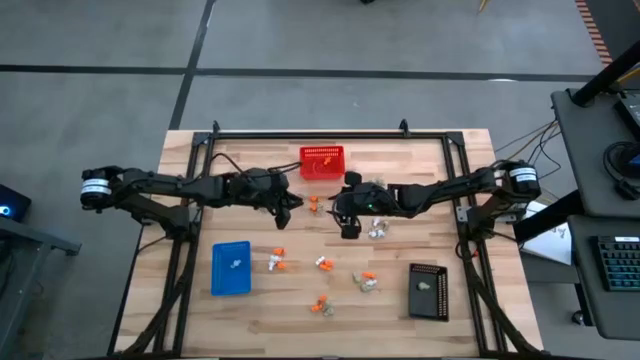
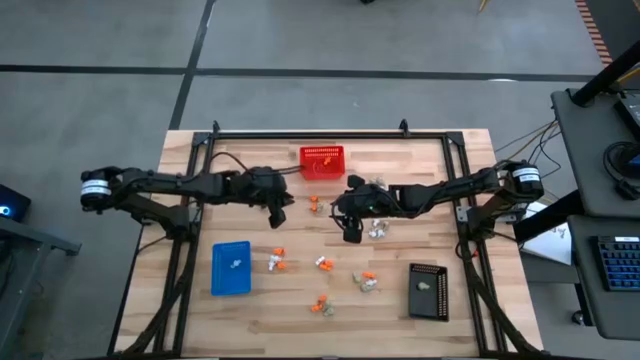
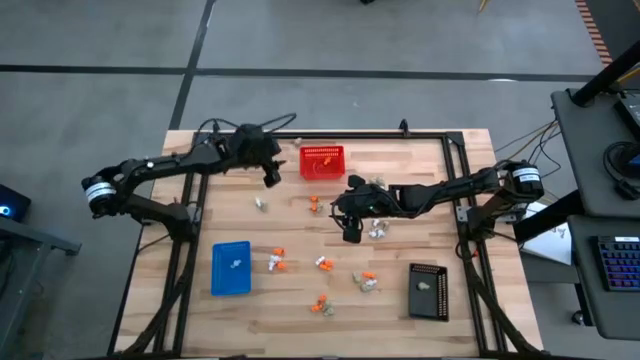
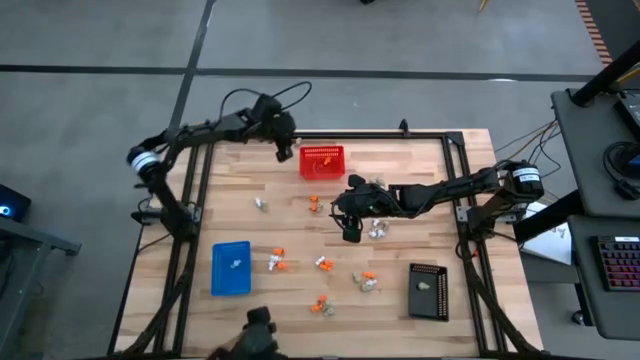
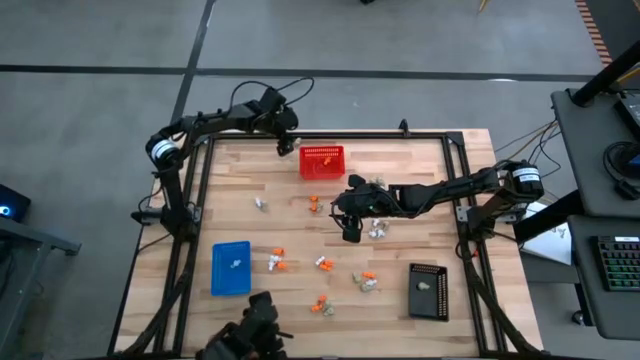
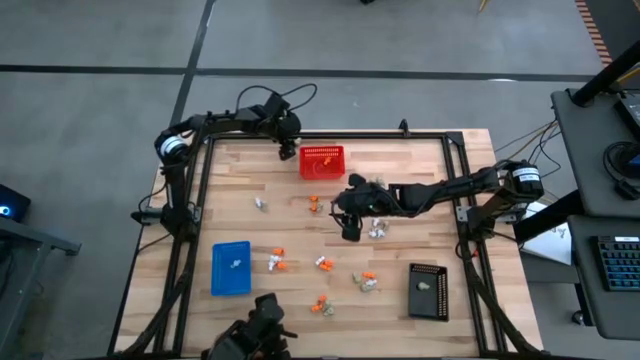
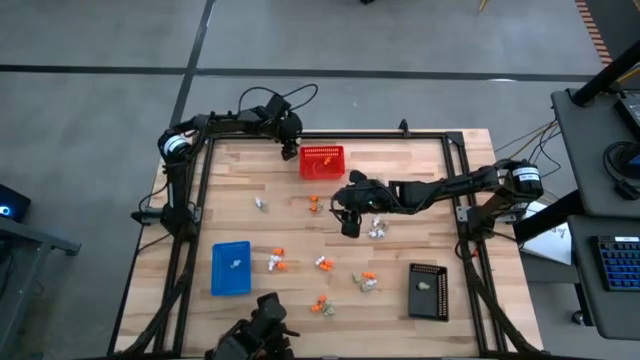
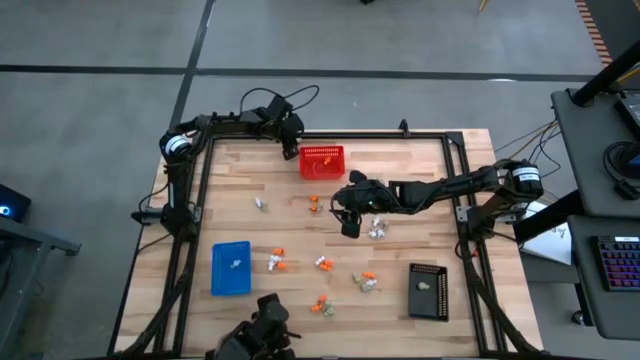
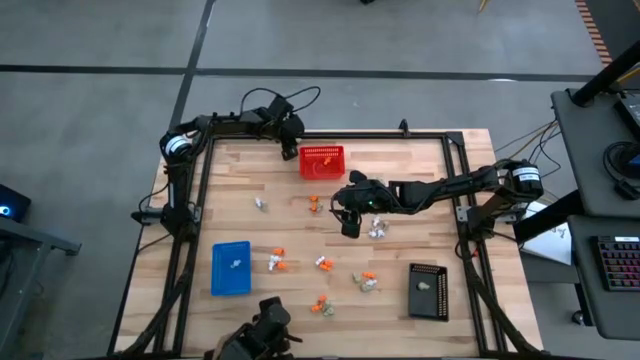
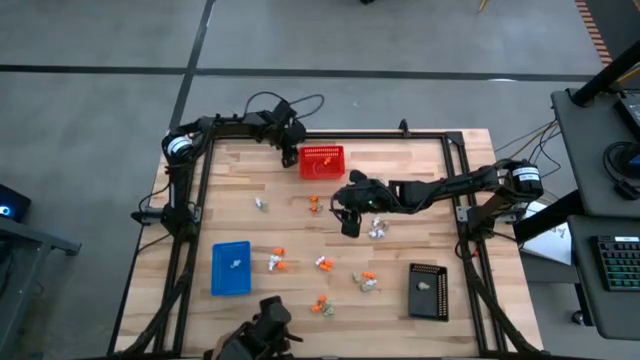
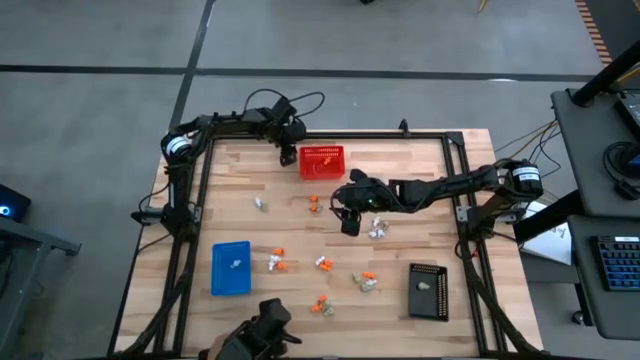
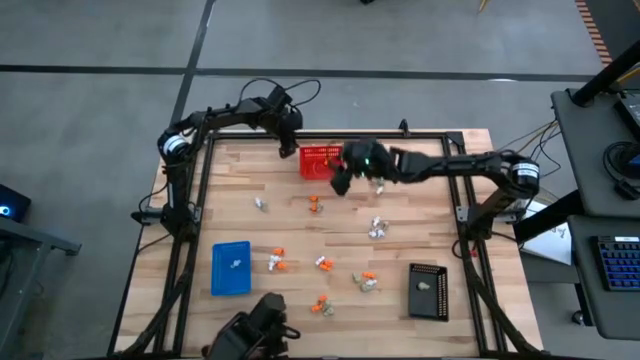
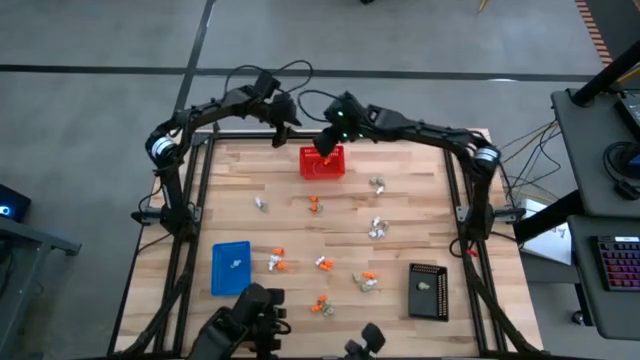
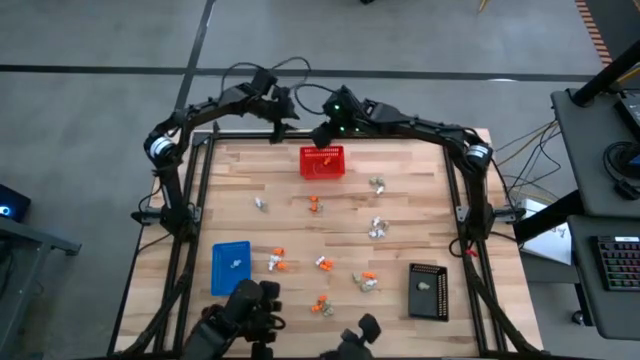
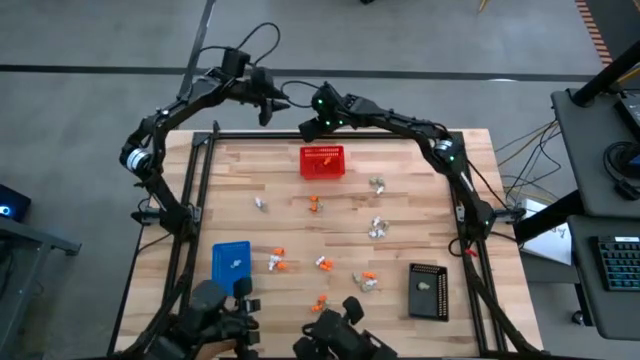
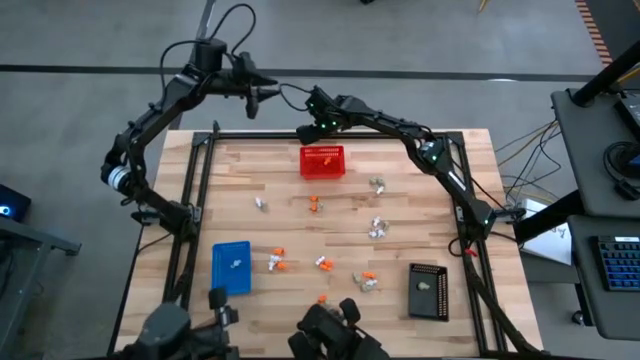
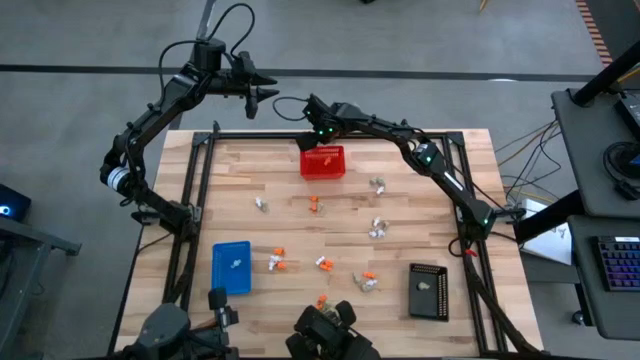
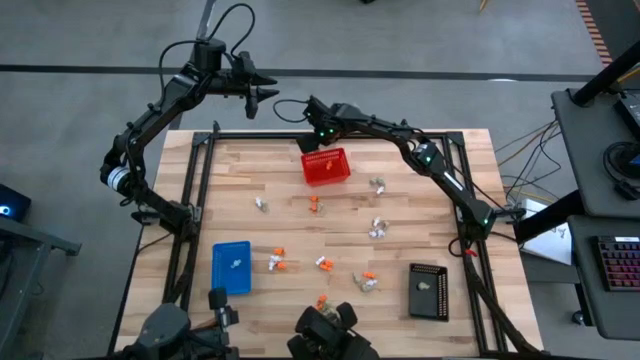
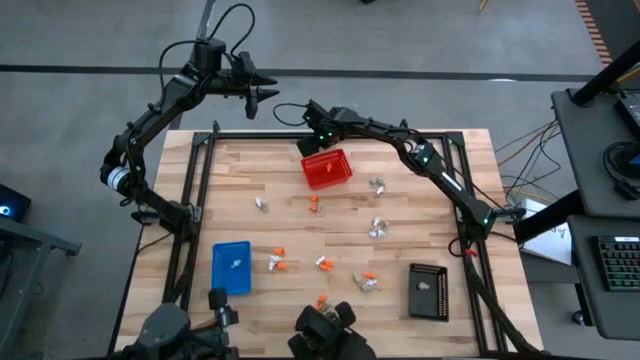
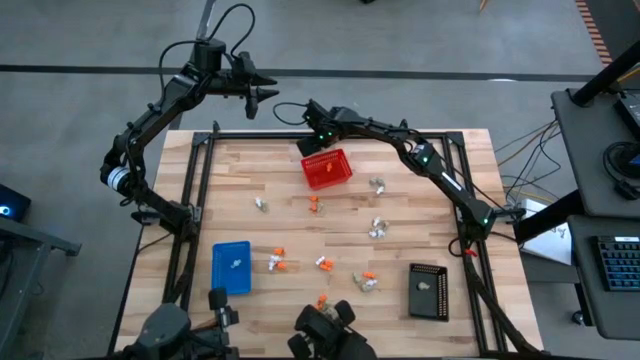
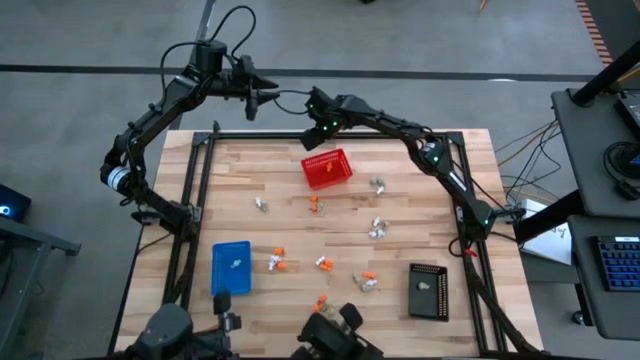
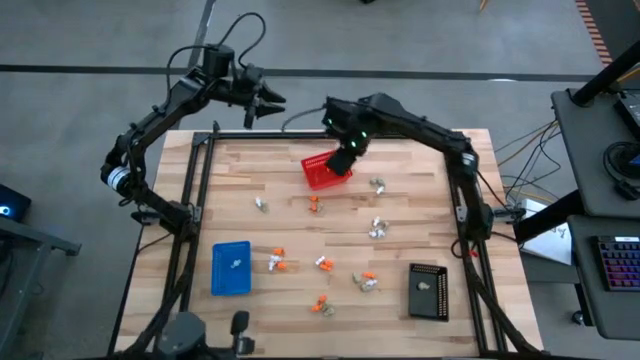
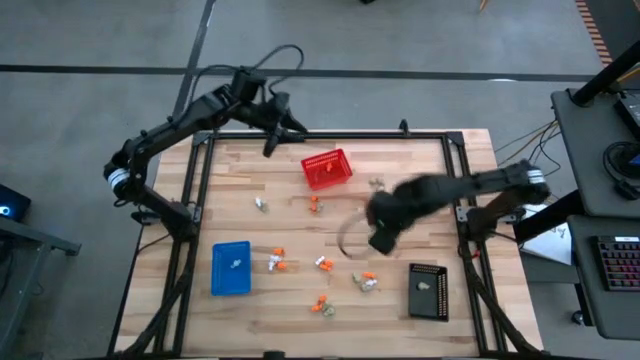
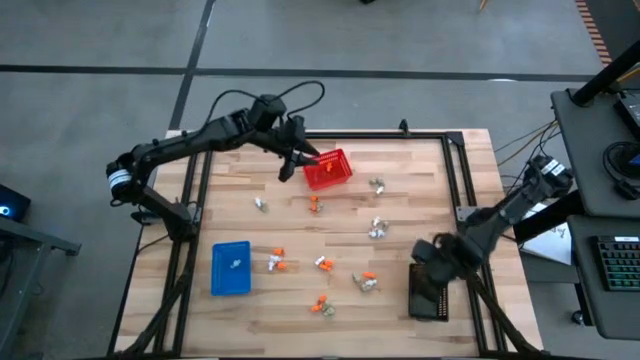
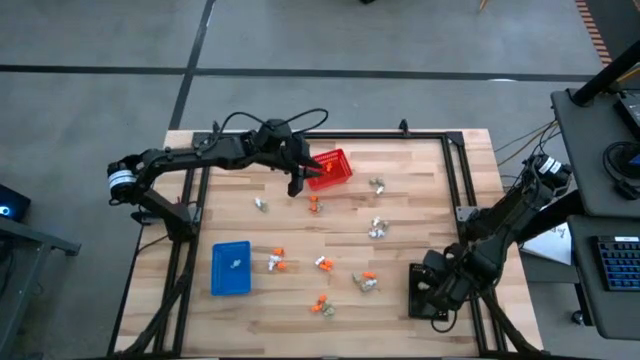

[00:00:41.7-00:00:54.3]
Task: Sort Halloween decoration
Put the gray skull toy into the black bin

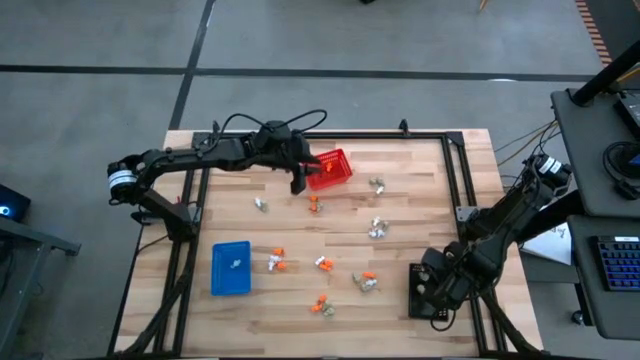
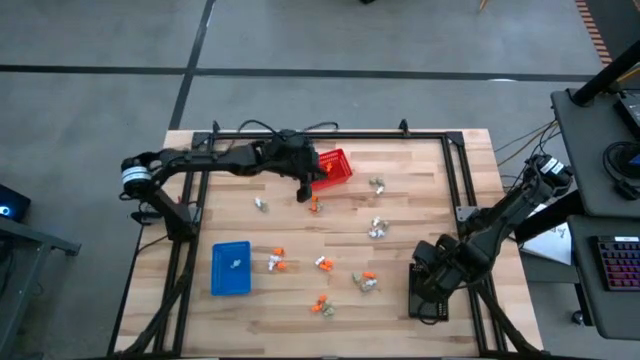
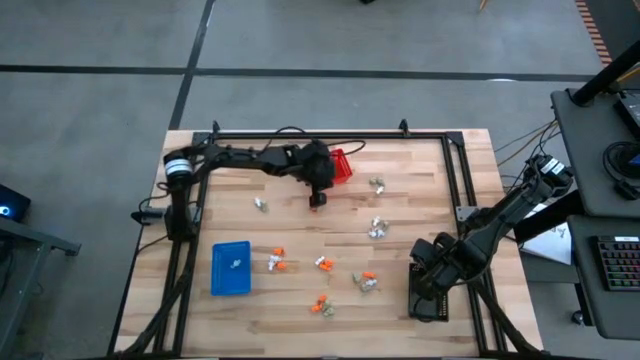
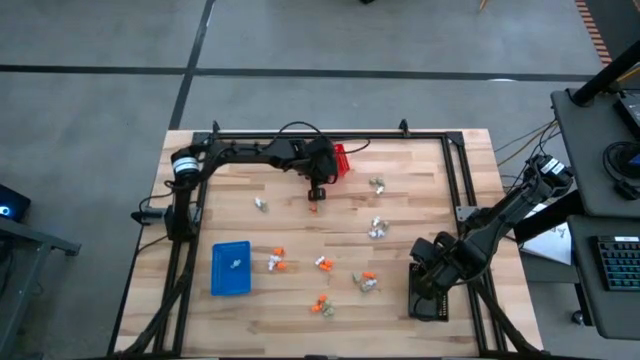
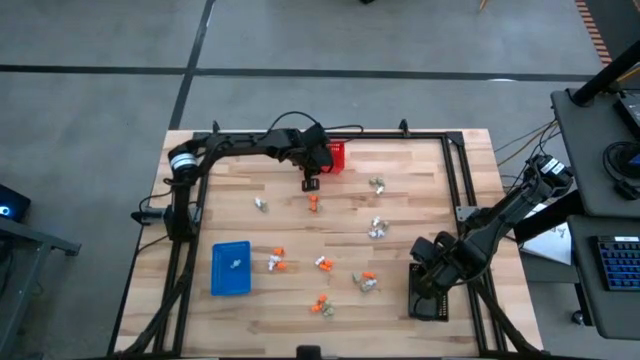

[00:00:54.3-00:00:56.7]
Adjust the red bin

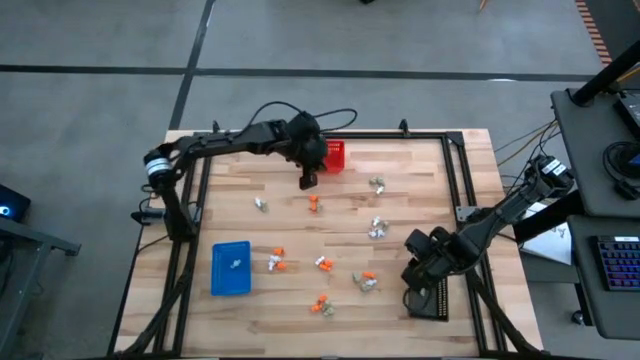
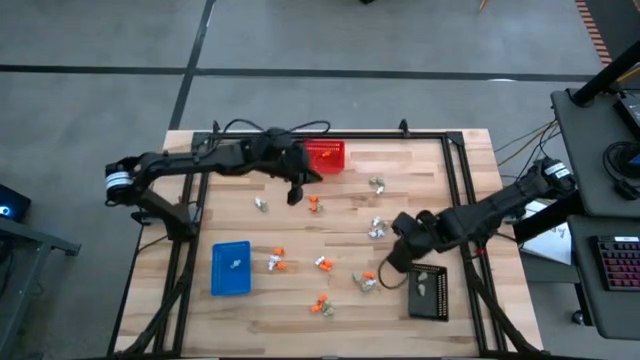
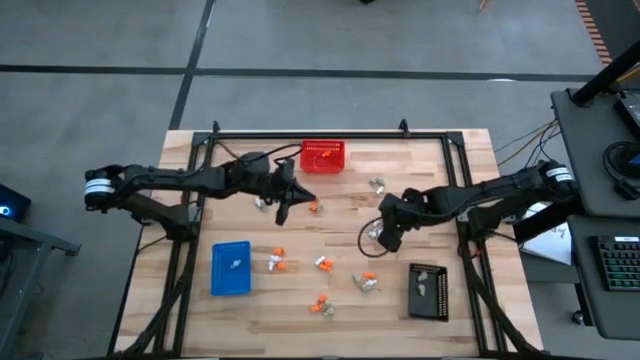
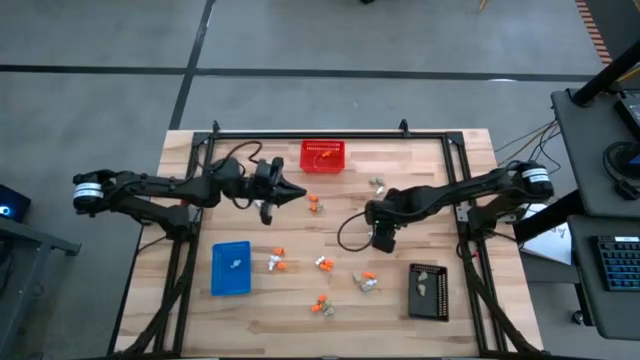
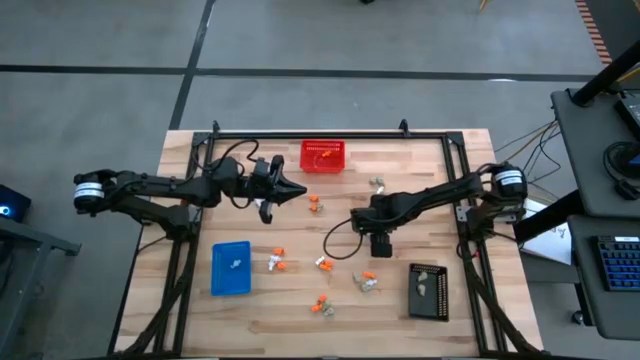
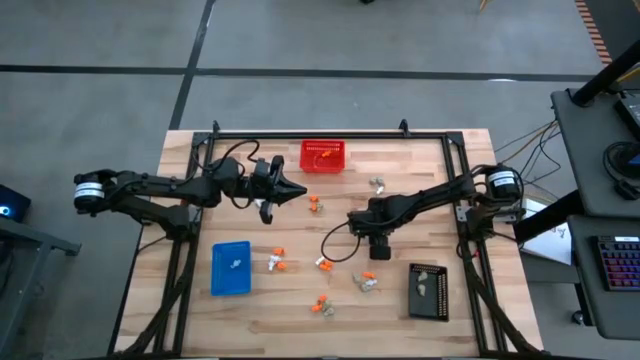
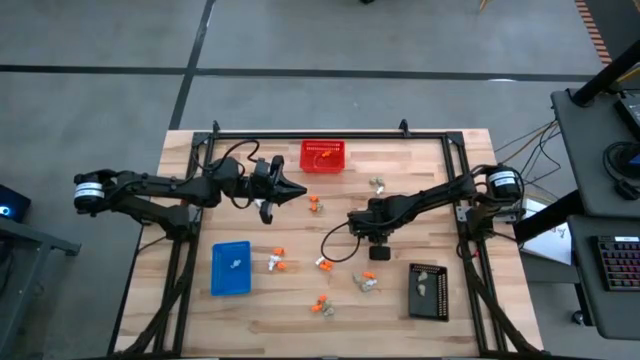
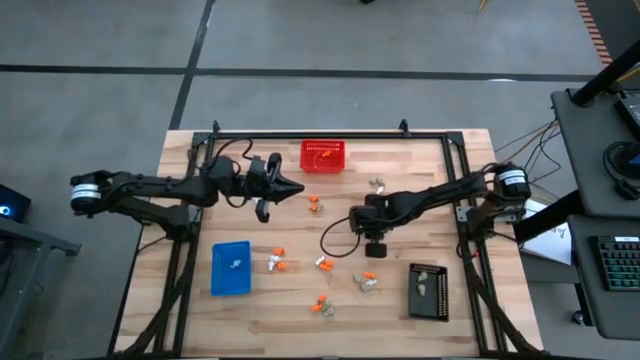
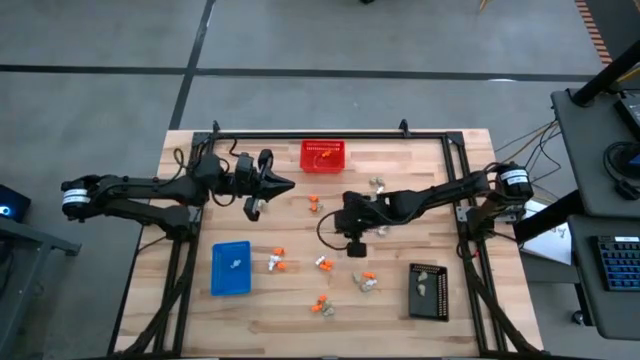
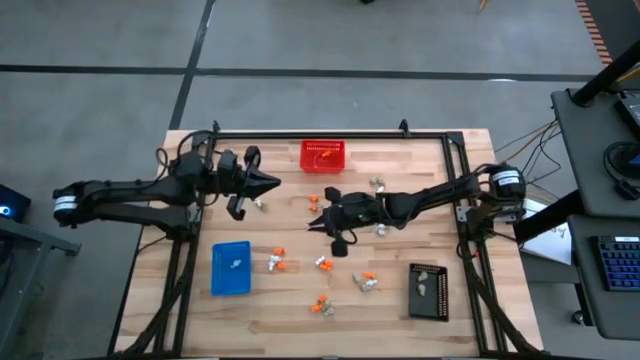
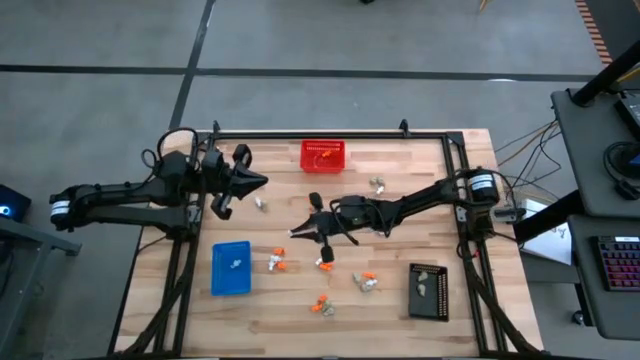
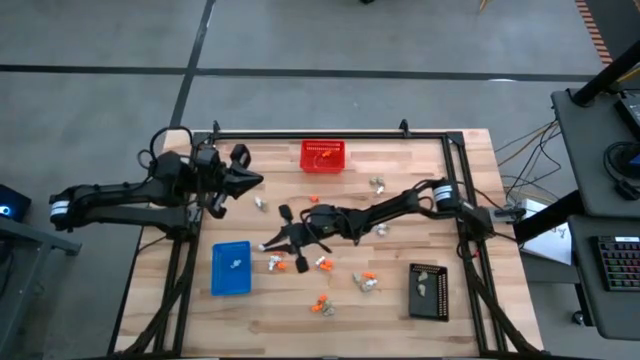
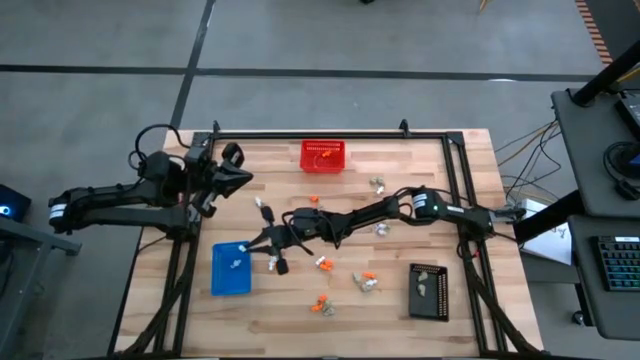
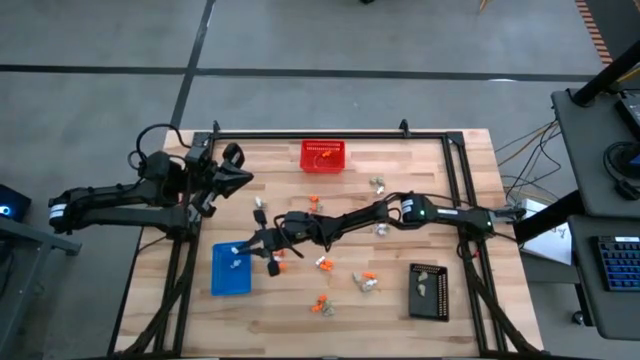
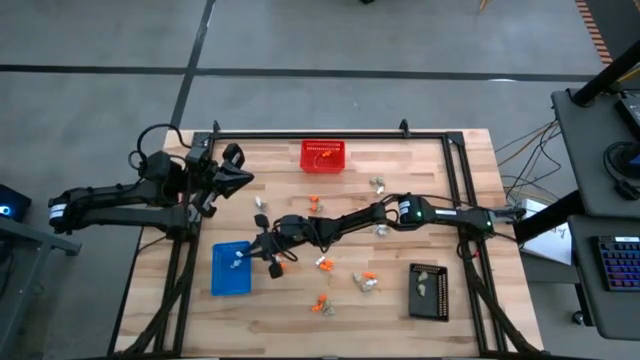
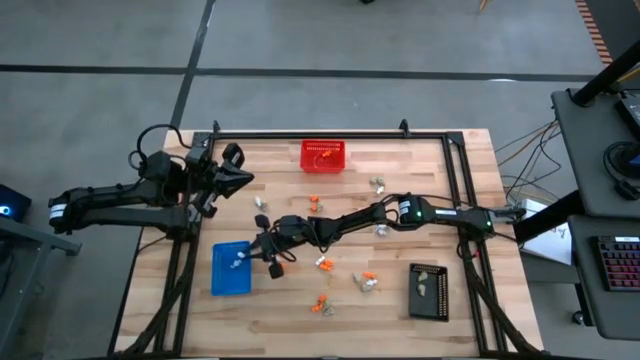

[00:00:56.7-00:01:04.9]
Put the white skeleton toy into the blue bin
